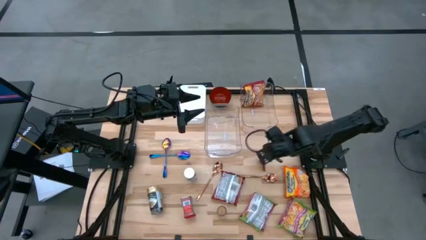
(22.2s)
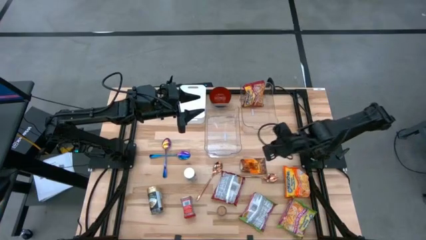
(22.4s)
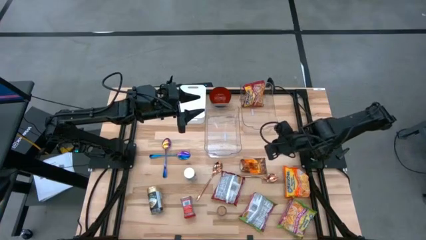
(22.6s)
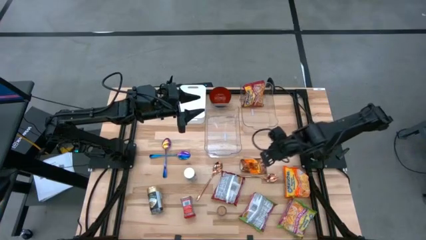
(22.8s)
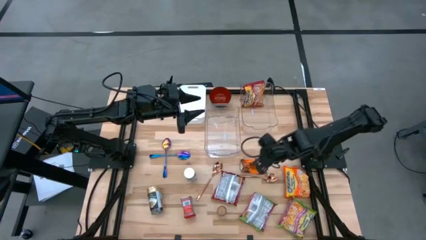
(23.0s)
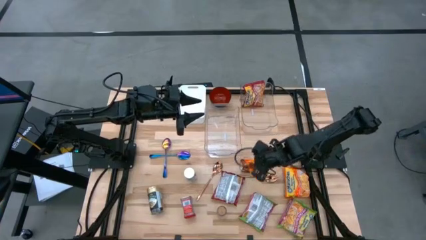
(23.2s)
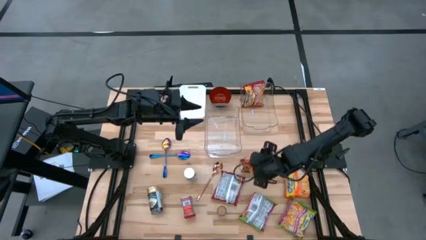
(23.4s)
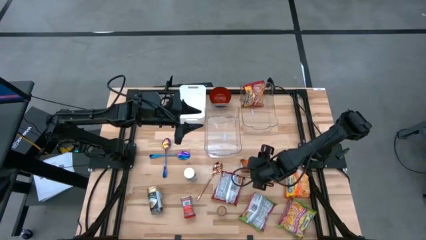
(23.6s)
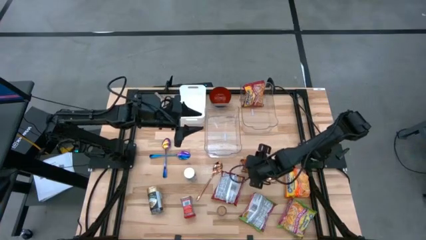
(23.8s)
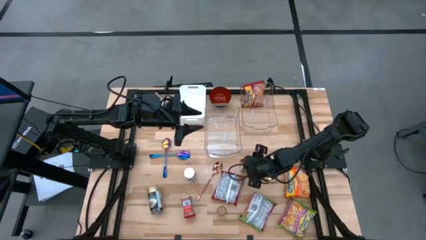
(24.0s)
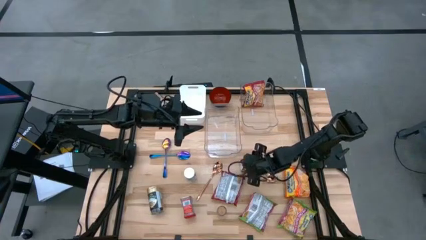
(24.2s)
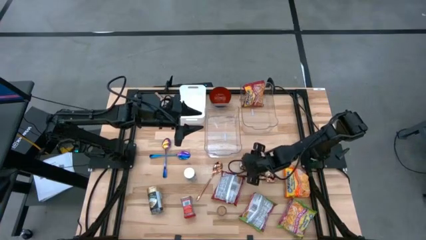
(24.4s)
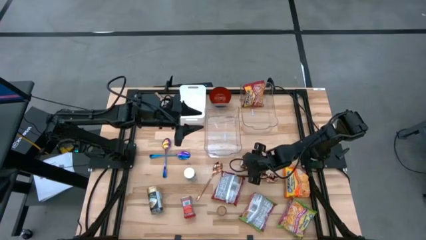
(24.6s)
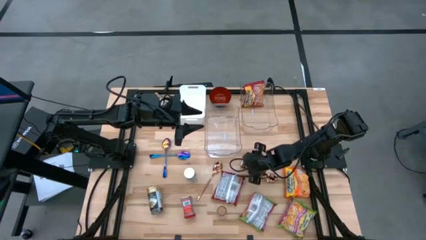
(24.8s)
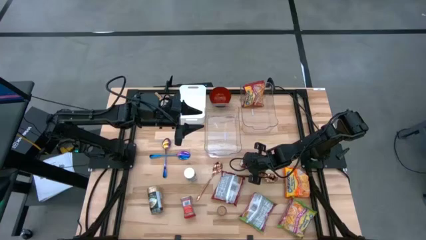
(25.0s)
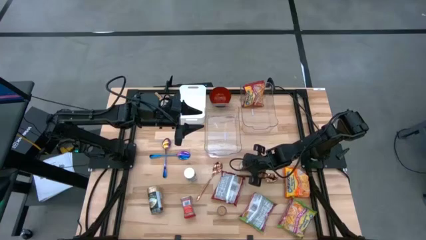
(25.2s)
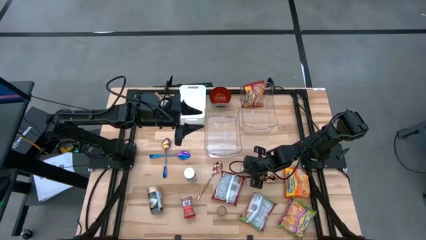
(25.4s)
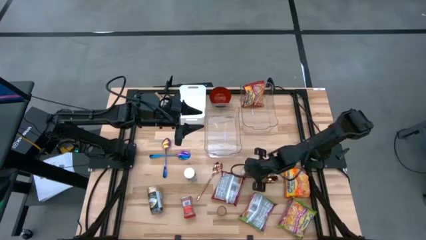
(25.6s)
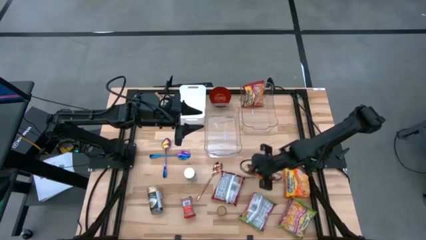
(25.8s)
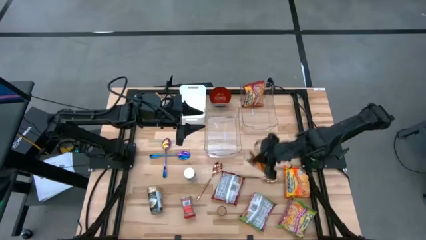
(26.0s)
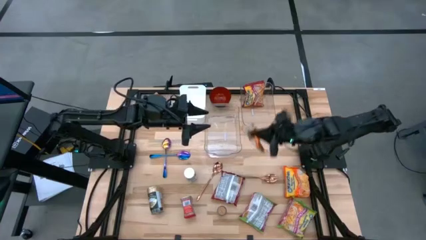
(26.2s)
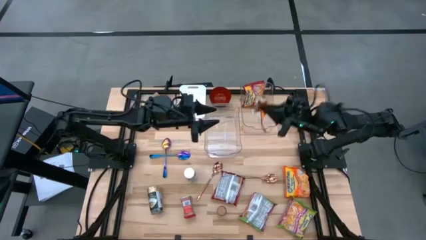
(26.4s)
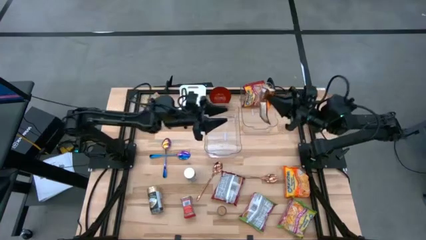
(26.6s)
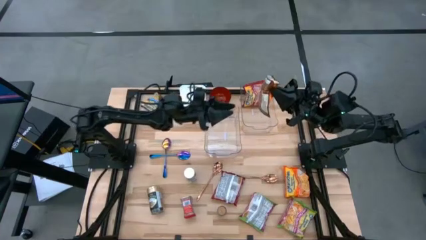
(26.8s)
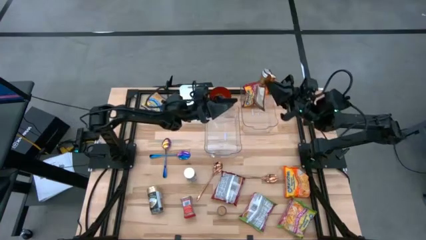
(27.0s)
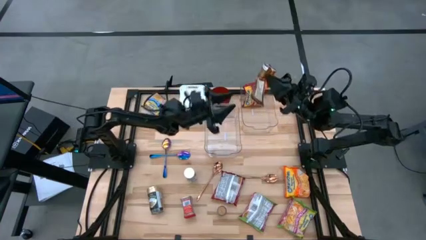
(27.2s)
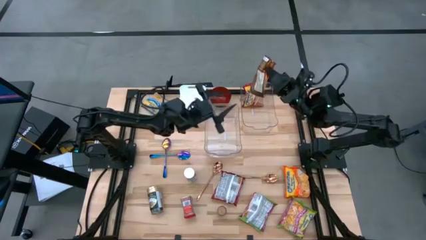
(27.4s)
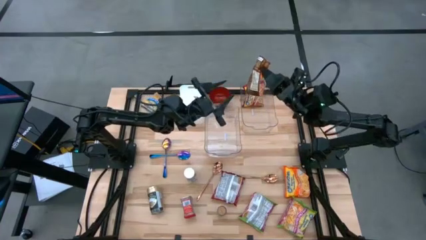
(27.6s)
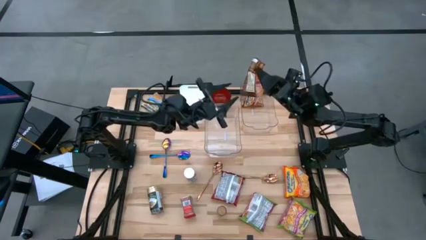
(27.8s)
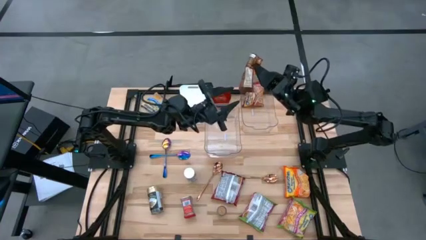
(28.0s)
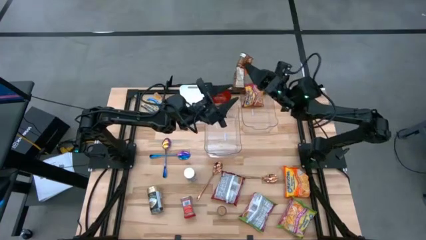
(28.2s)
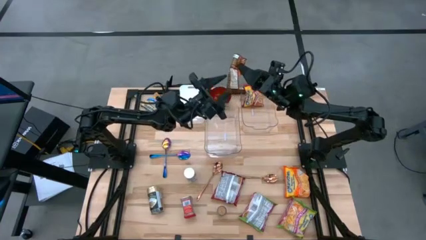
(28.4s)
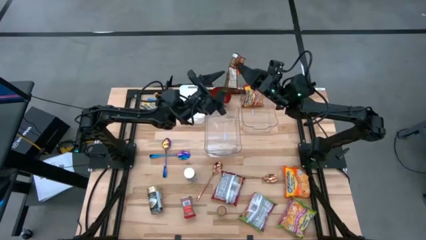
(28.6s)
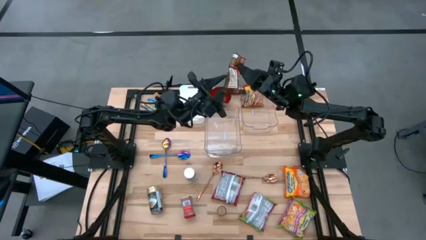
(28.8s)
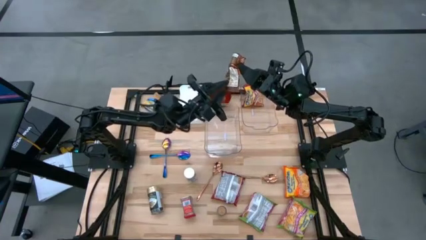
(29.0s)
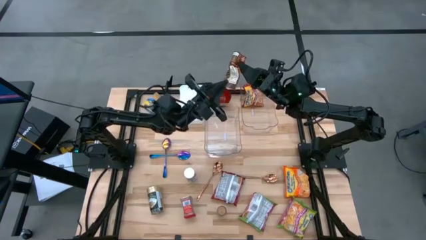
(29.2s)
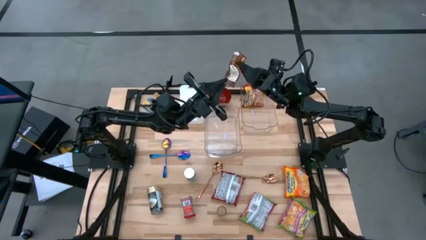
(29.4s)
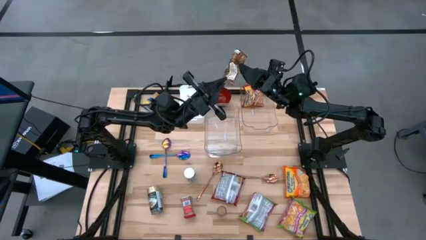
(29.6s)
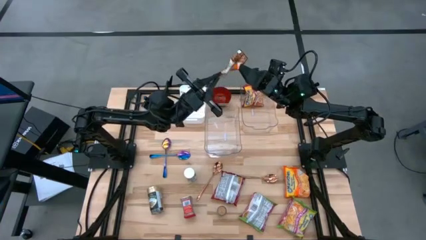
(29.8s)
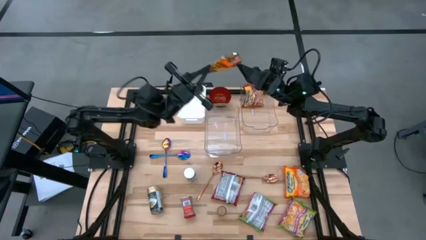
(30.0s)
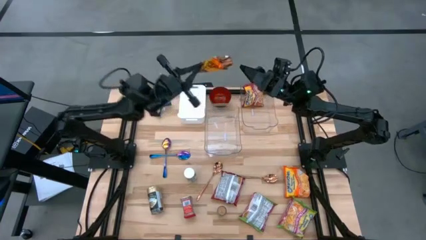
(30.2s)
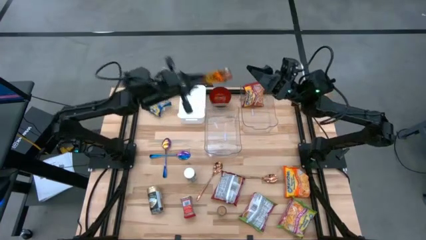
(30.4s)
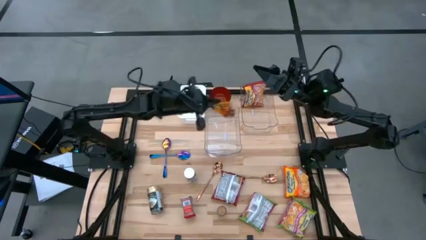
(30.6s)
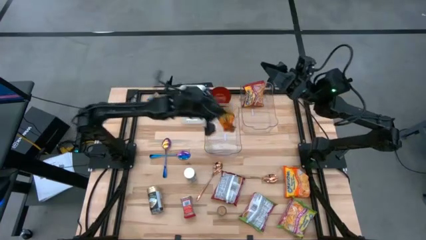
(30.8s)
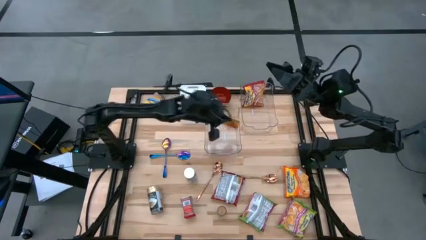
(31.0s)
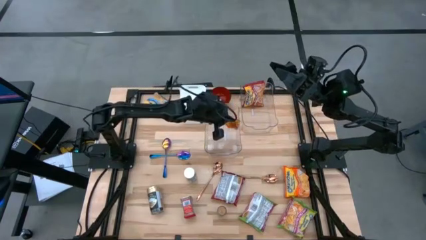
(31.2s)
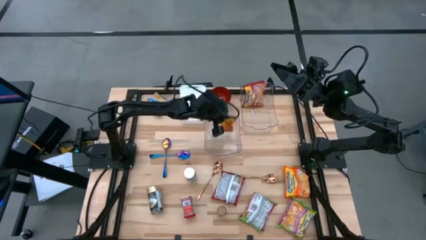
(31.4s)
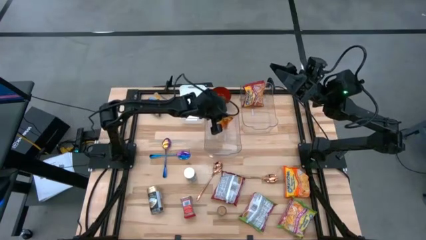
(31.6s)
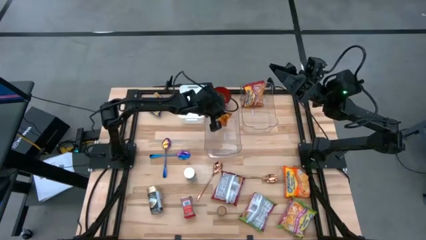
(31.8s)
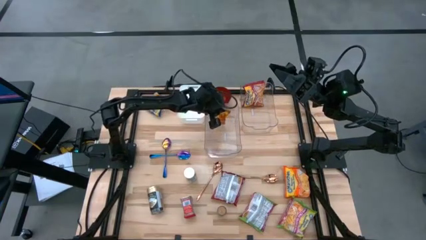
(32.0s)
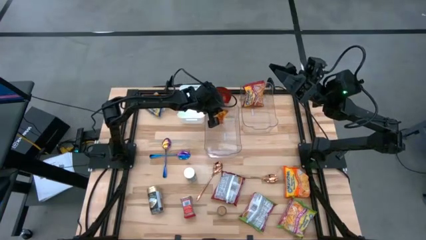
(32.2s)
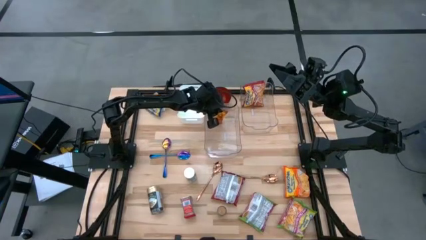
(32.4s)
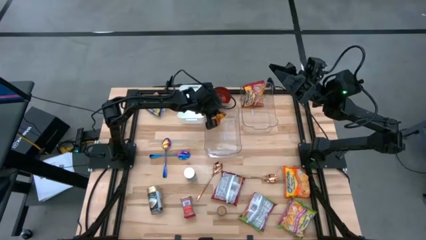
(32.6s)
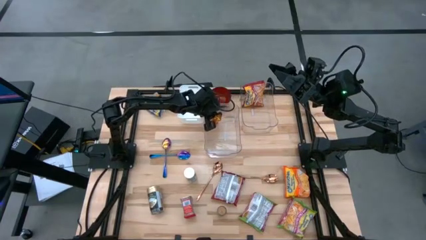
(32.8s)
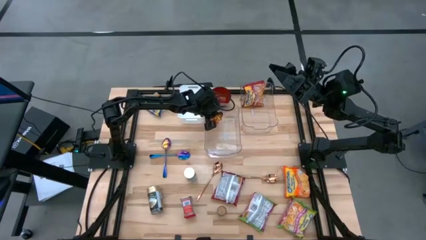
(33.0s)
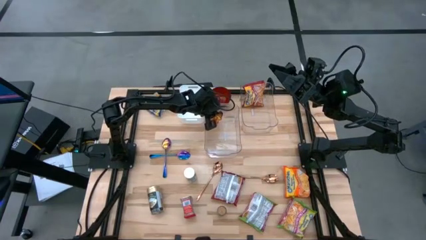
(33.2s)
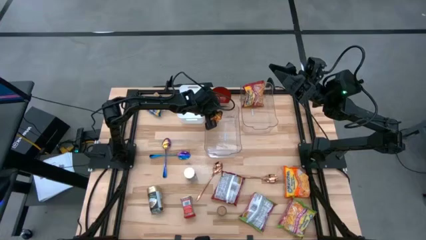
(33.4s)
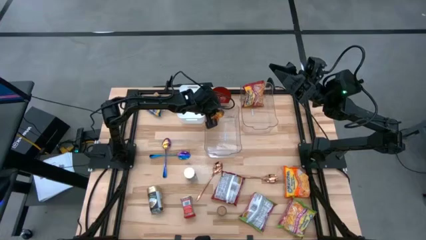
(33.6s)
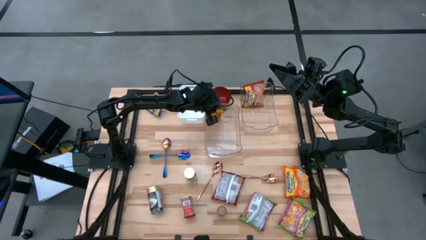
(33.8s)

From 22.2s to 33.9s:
Task: Pick & Place Food Item
Put the orange spice pack into the left transparent bin
